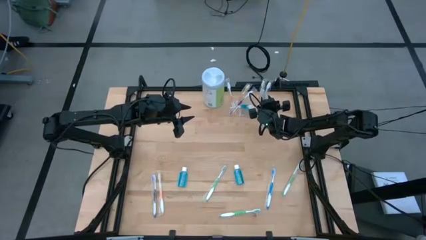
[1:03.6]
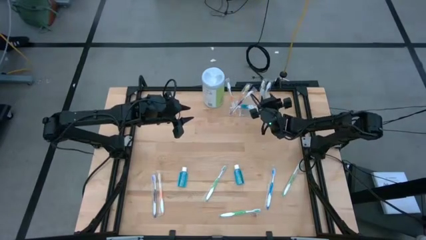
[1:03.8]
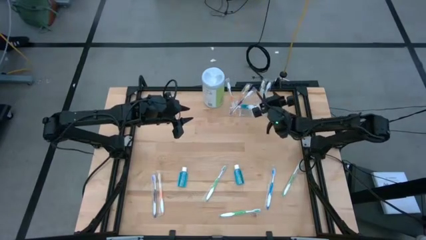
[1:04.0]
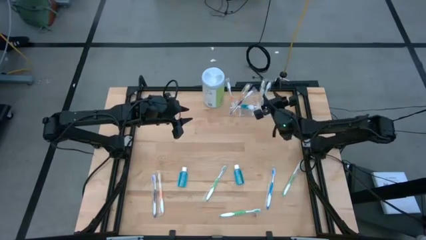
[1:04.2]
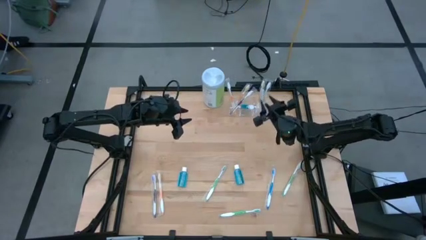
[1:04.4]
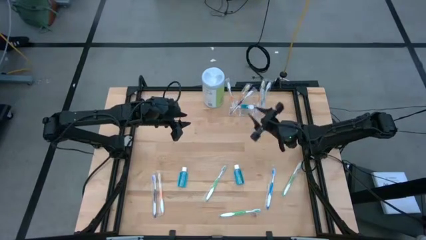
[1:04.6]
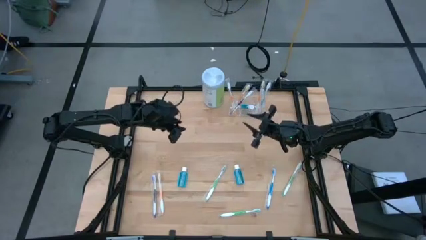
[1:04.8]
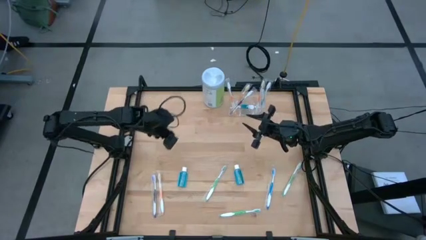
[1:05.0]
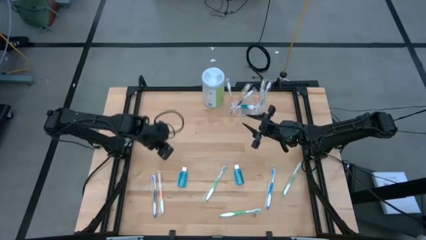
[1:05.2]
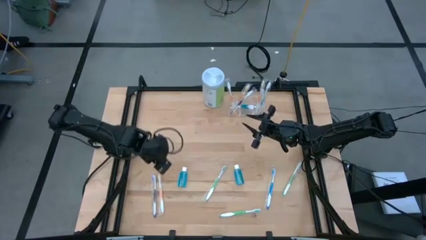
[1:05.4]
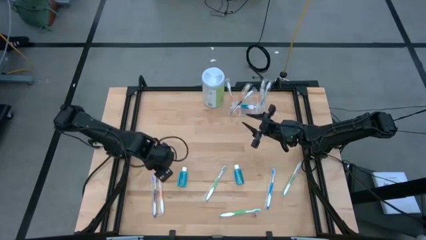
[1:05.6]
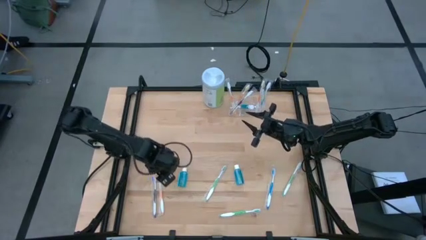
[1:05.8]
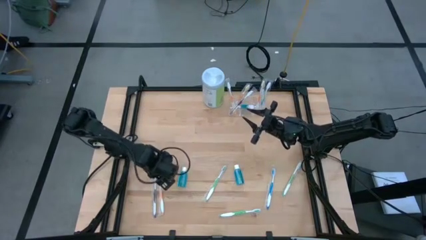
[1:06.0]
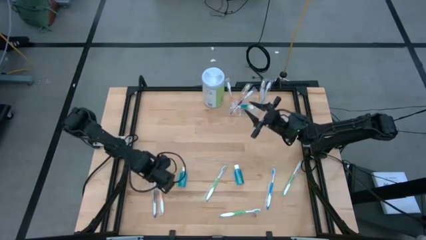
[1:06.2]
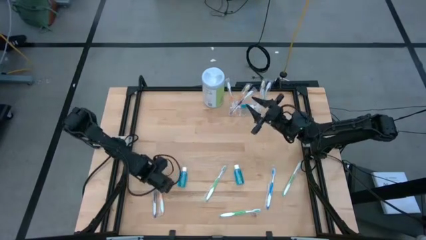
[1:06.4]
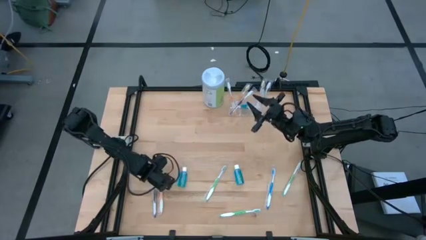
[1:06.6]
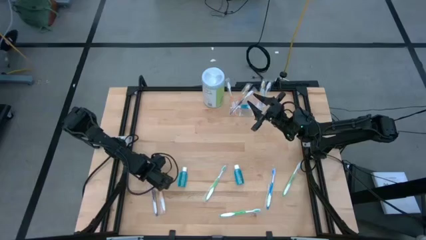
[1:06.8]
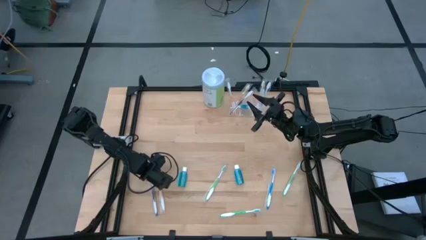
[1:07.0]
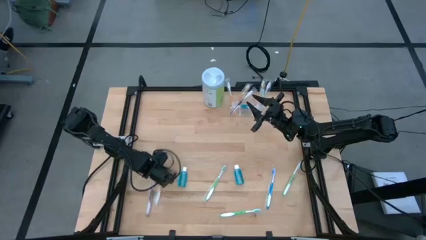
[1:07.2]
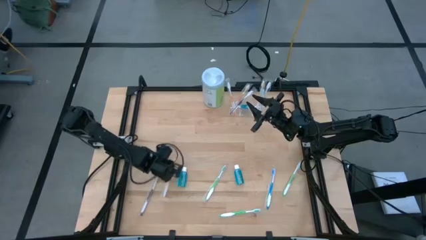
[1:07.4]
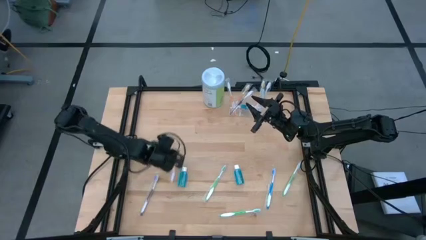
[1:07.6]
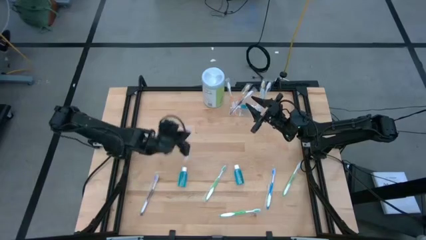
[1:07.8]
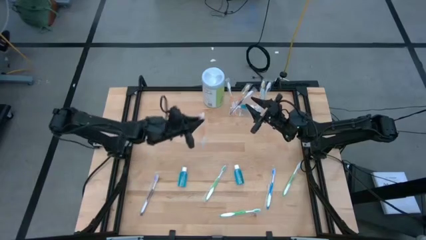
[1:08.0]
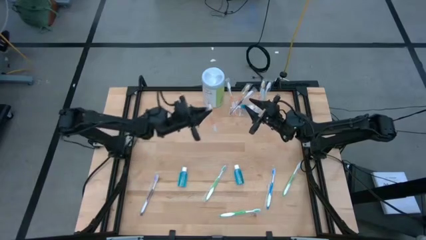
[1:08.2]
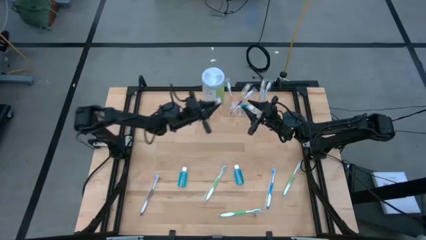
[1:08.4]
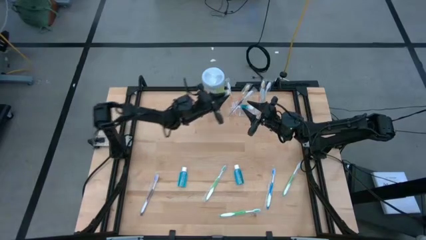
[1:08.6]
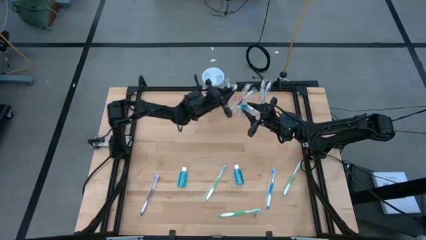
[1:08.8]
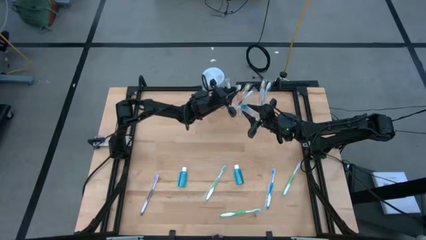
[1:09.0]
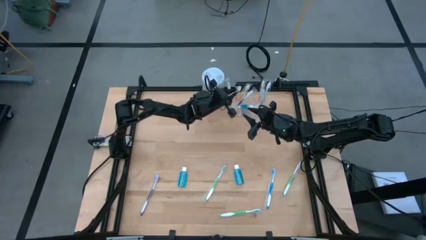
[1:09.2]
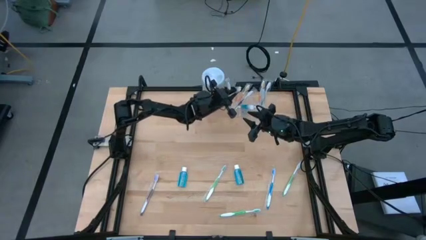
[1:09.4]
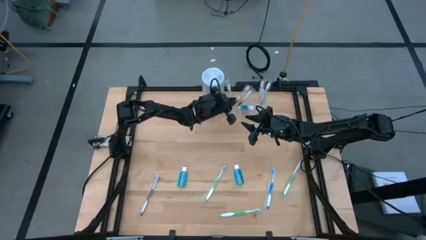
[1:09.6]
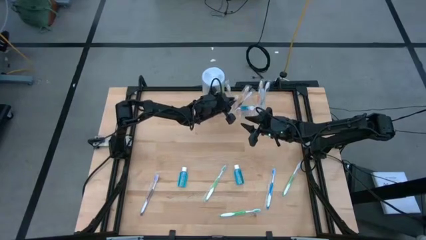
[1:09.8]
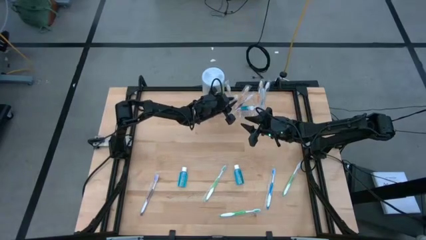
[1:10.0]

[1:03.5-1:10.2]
Task: Pick & Place toothbrushing station
Put the orange toothbrush into the transparent organizer

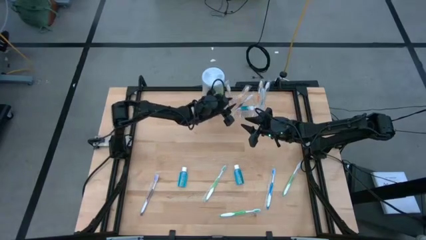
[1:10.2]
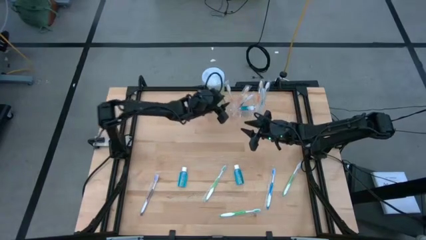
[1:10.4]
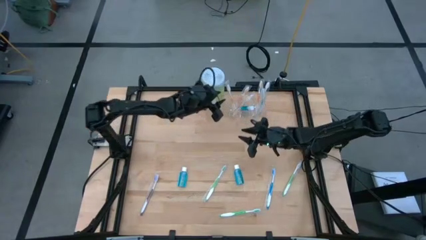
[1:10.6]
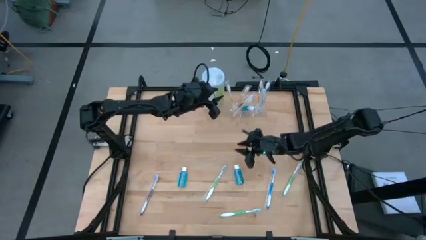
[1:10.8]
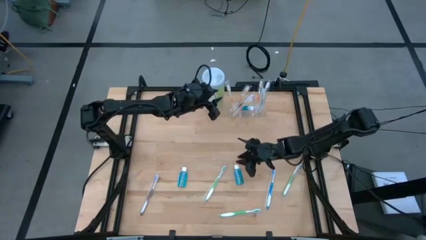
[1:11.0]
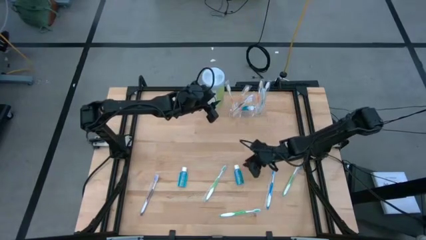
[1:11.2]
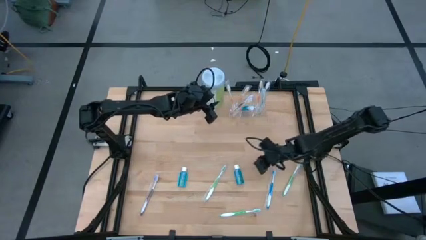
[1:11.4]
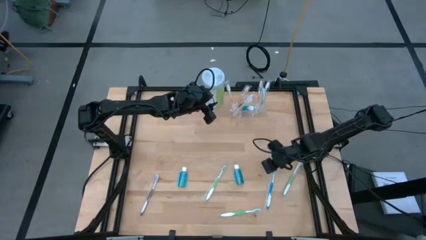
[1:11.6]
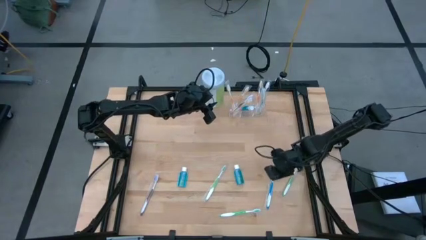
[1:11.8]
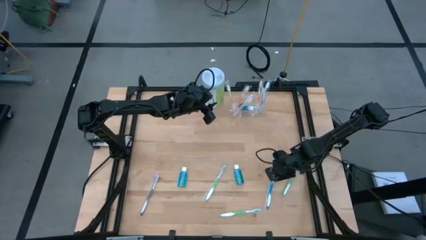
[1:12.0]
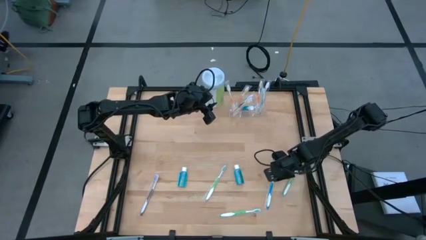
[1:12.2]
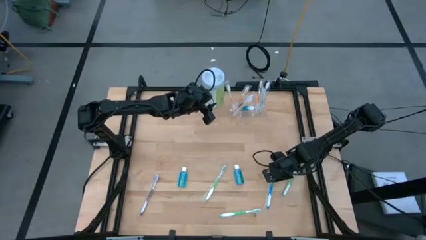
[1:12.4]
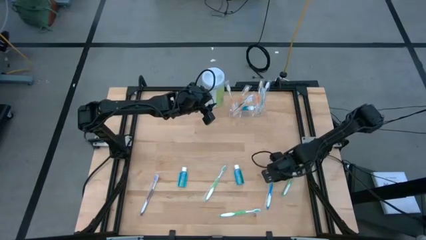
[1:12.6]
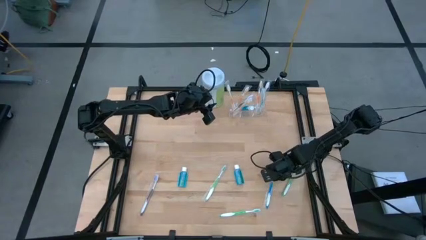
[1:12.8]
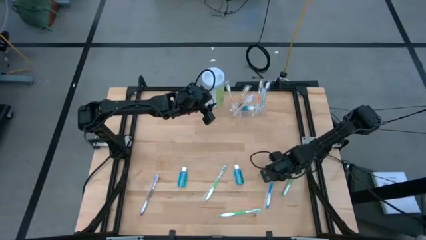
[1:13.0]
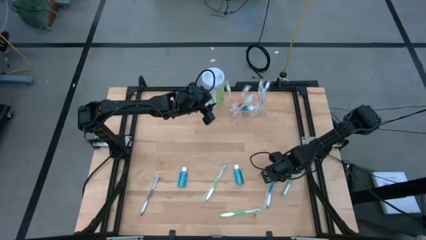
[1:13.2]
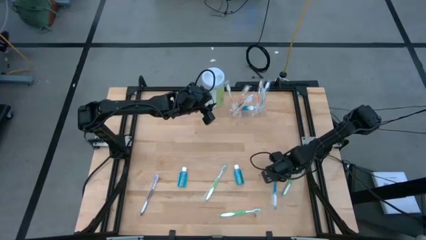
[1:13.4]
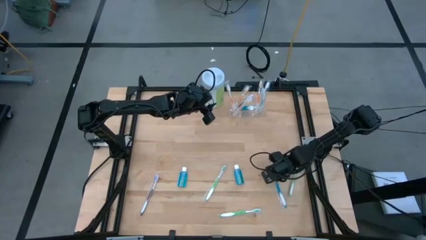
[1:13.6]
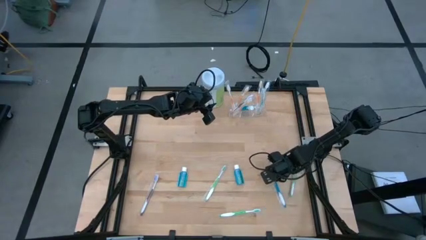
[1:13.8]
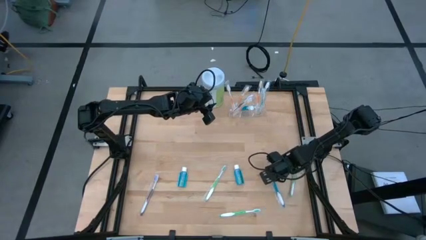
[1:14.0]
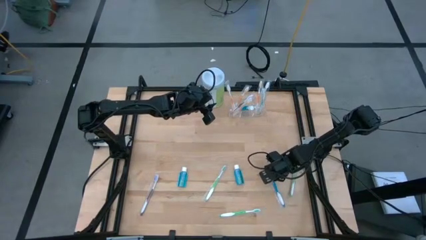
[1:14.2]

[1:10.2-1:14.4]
Put the blue toothbrush into the transparent organizer

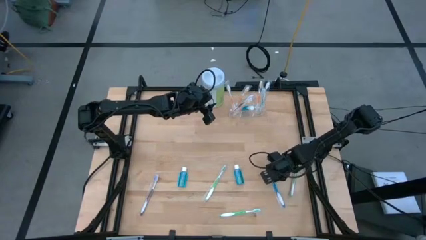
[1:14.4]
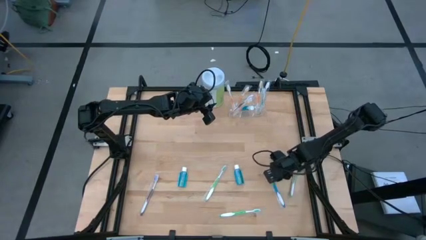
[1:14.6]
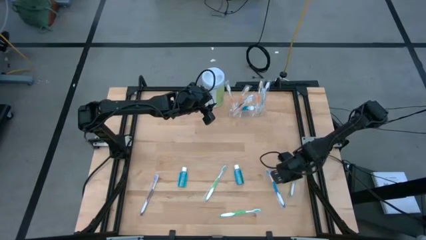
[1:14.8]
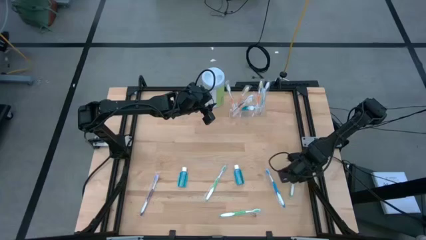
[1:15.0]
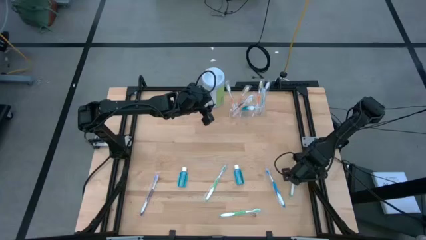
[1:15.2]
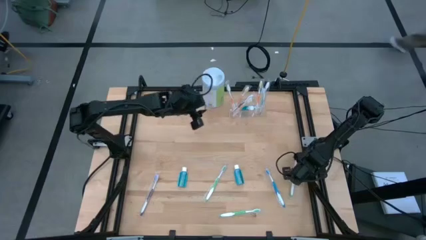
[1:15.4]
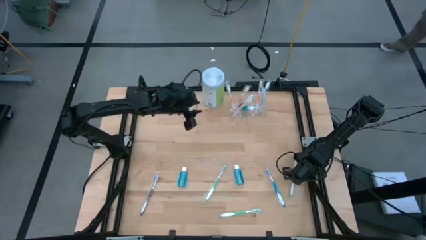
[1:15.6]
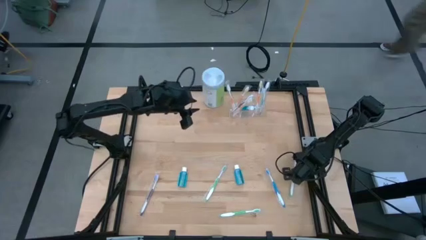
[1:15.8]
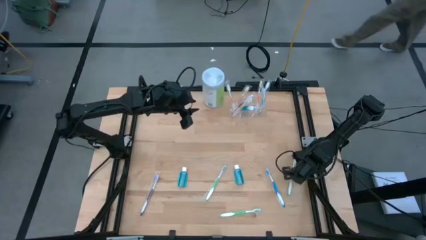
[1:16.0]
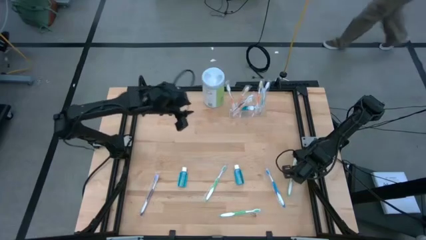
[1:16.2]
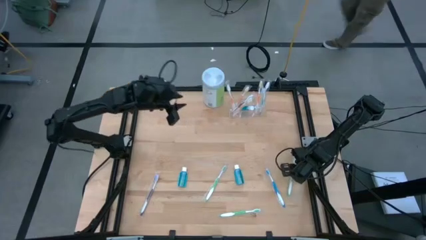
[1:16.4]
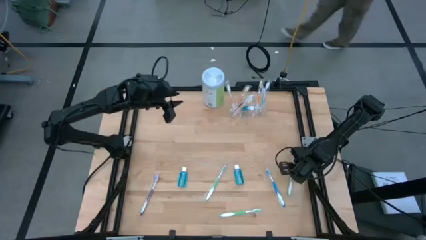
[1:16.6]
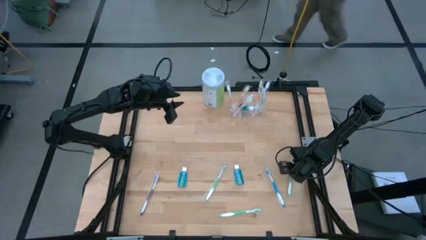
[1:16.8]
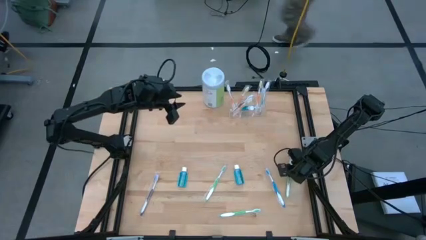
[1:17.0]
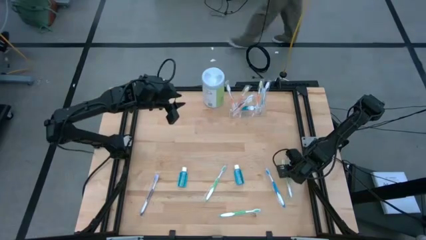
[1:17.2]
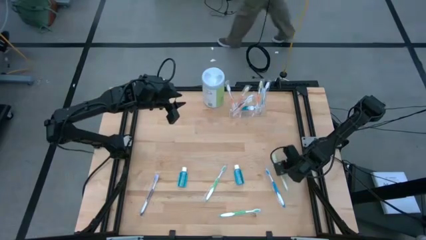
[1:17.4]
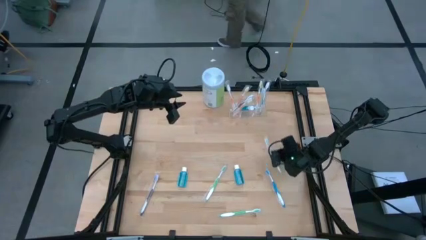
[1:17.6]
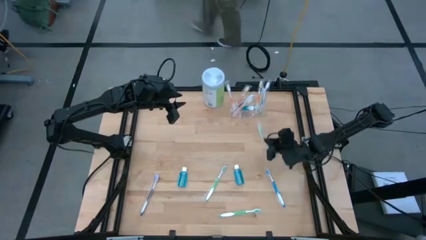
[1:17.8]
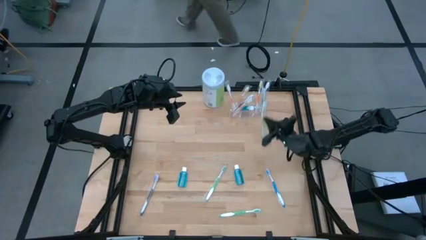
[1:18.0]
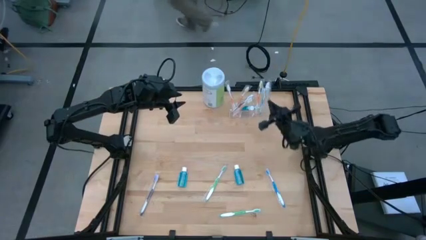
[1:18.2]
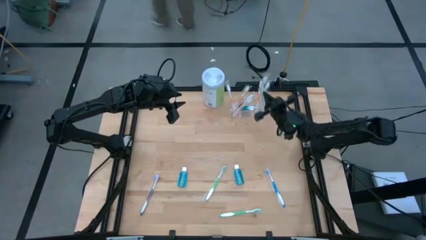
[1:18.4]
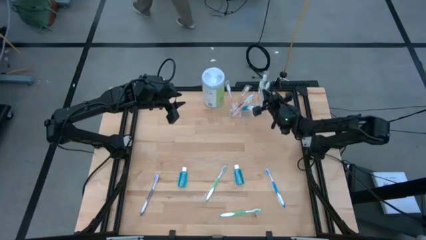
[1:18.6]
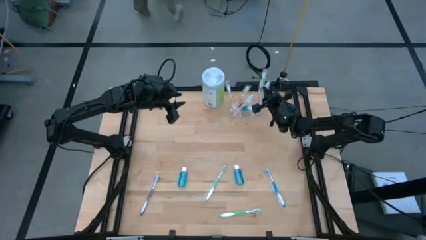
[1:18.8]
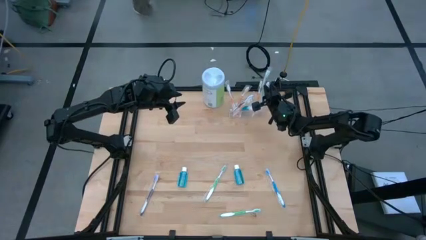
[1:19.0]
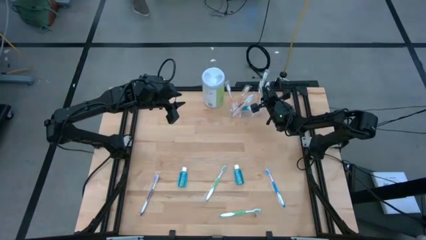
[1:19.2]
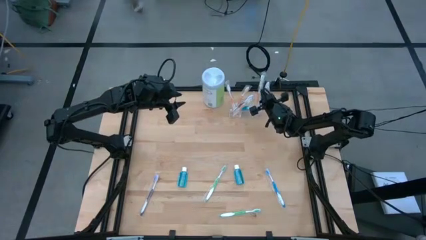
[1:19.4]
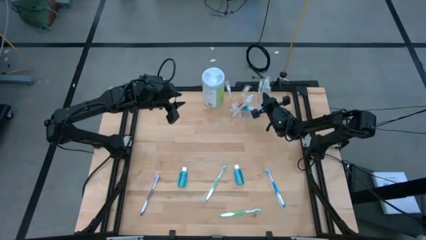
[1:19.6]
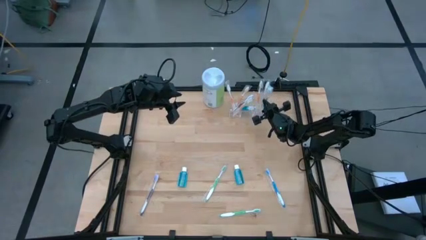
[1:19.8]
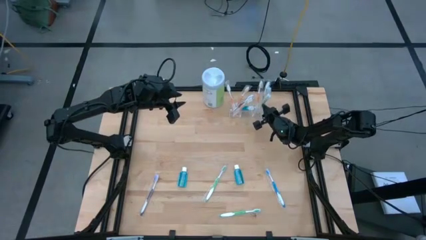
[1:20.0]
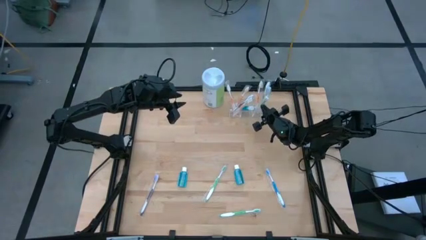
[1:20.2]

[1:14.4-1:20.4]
Put the green toothbrush into the transparent organizer
